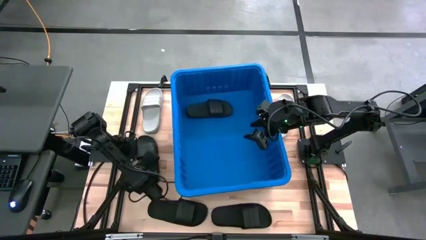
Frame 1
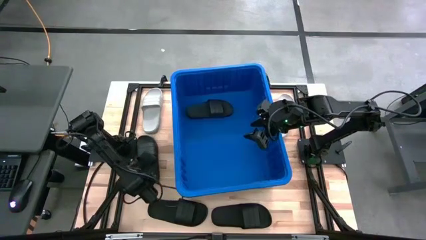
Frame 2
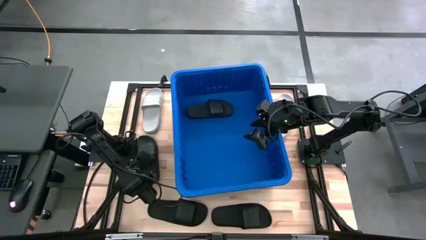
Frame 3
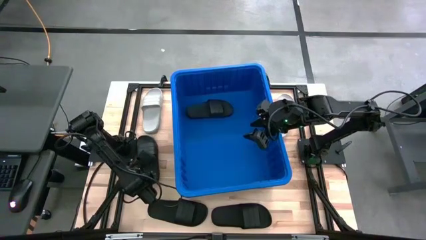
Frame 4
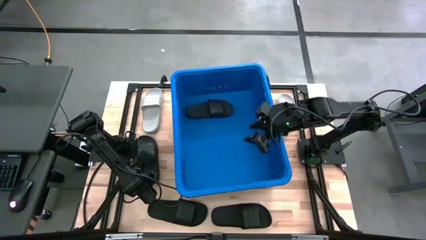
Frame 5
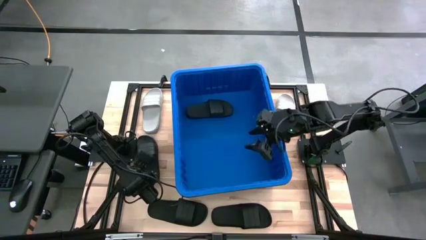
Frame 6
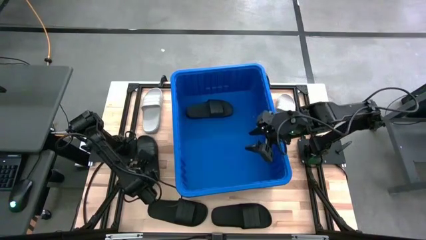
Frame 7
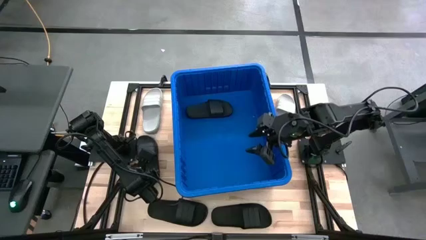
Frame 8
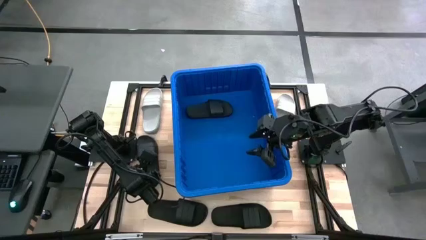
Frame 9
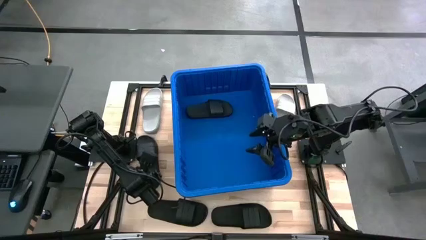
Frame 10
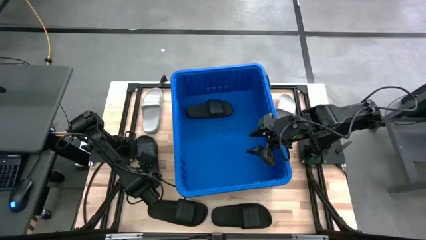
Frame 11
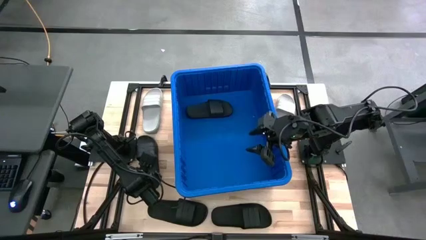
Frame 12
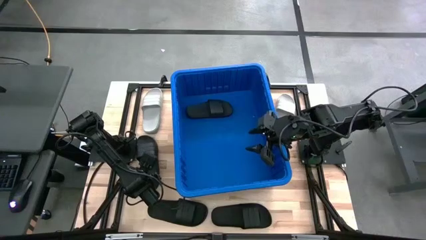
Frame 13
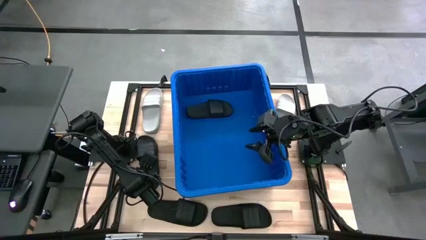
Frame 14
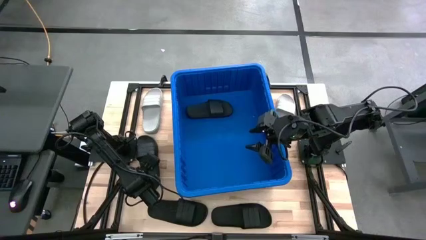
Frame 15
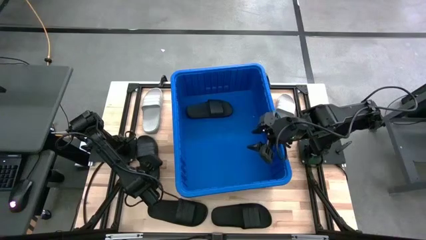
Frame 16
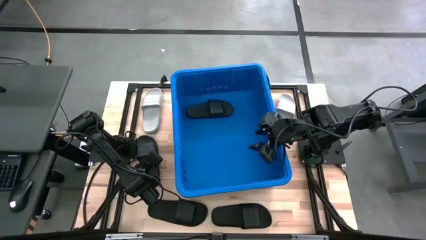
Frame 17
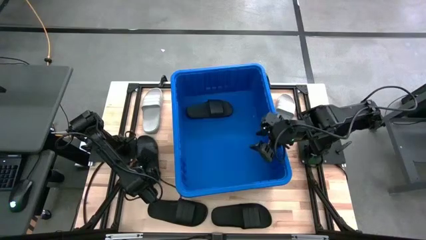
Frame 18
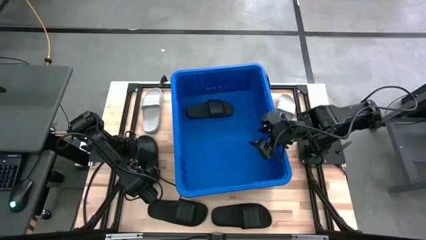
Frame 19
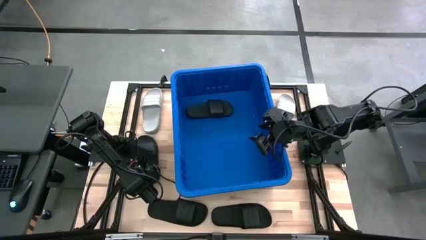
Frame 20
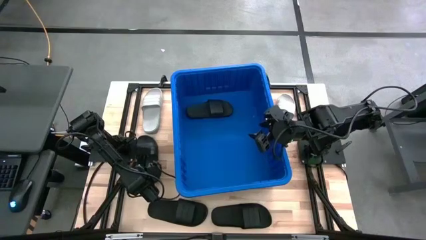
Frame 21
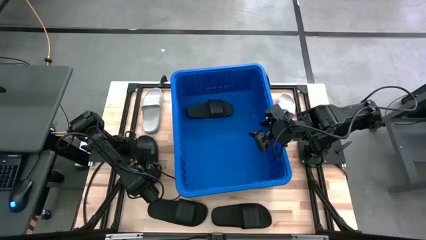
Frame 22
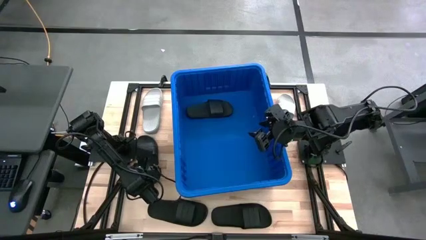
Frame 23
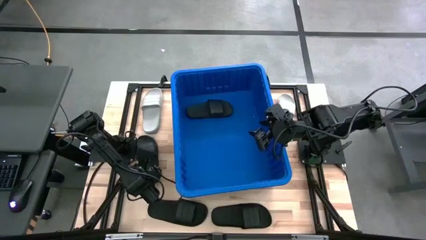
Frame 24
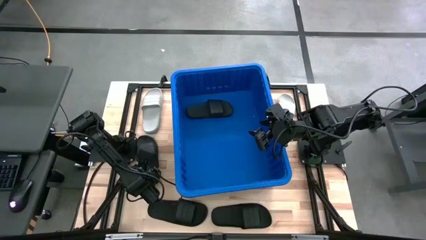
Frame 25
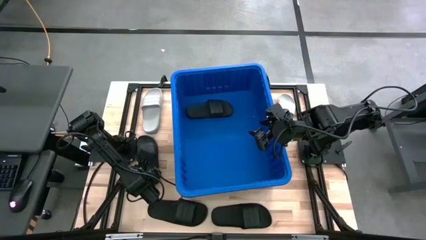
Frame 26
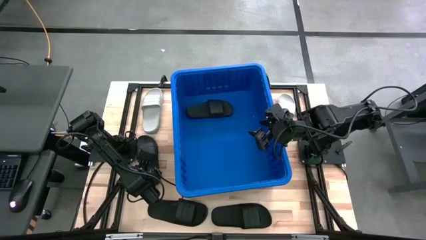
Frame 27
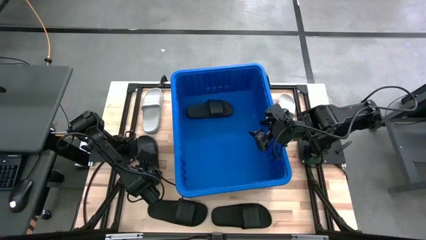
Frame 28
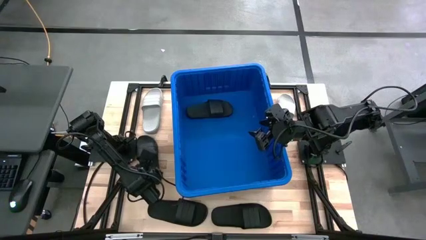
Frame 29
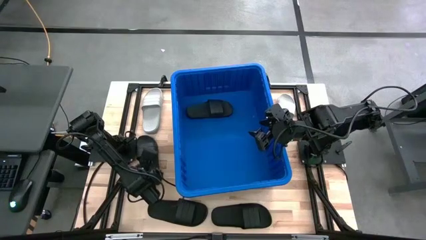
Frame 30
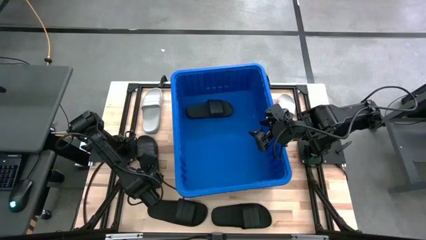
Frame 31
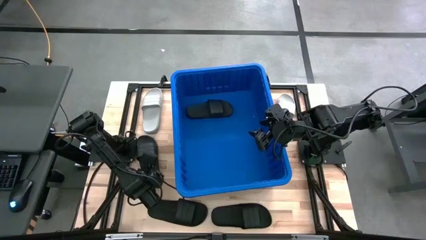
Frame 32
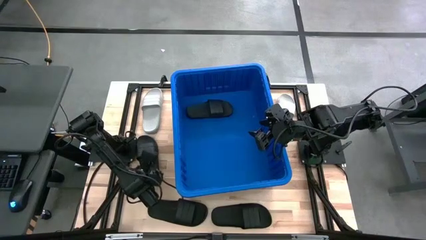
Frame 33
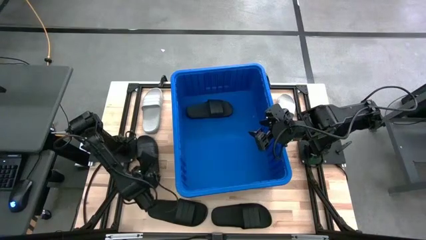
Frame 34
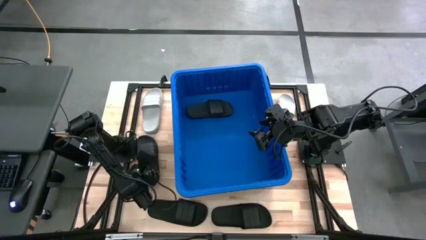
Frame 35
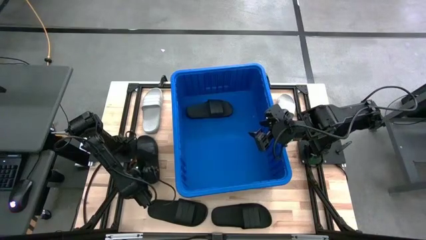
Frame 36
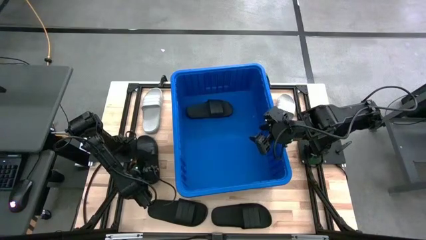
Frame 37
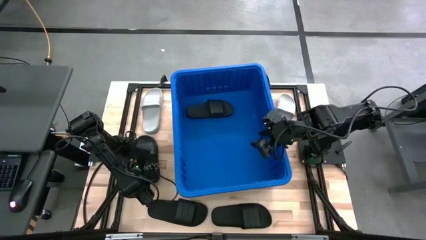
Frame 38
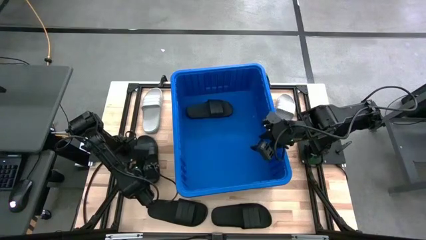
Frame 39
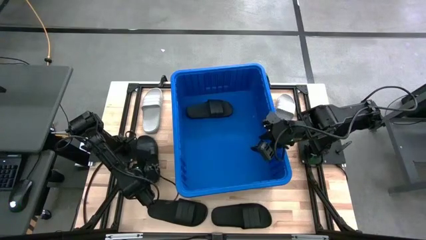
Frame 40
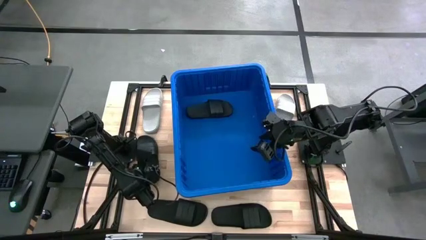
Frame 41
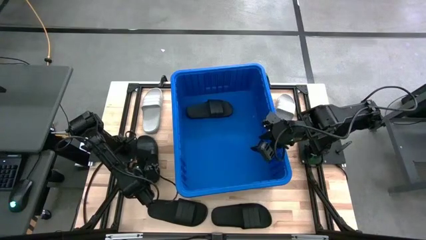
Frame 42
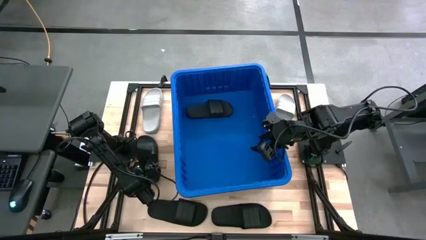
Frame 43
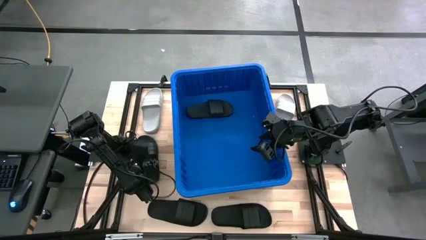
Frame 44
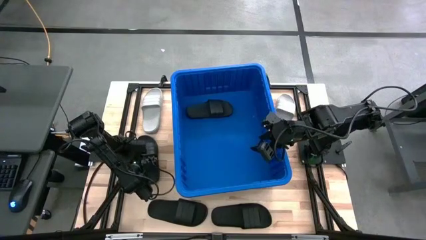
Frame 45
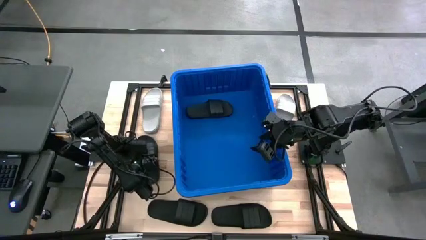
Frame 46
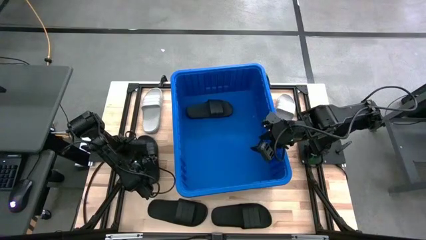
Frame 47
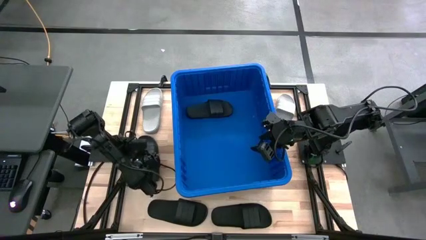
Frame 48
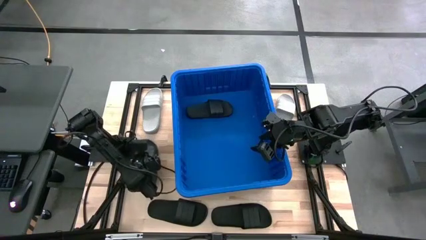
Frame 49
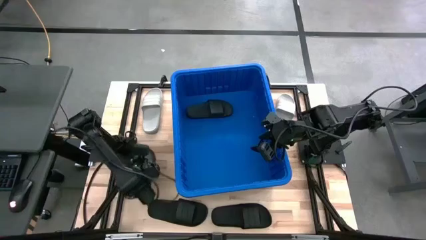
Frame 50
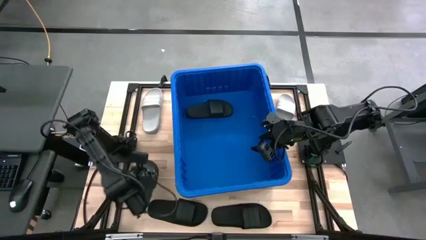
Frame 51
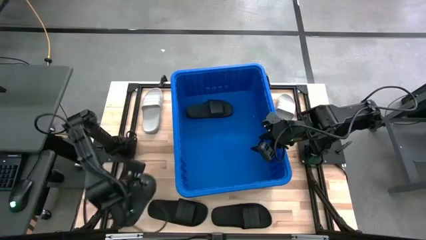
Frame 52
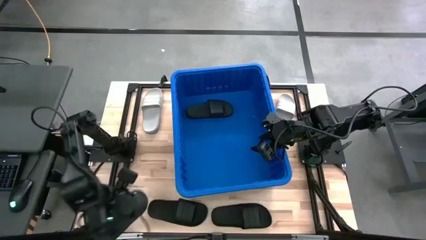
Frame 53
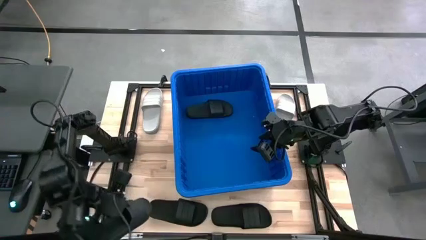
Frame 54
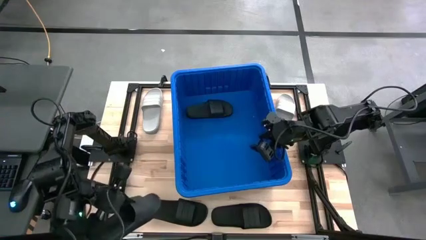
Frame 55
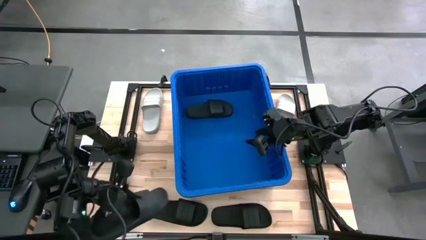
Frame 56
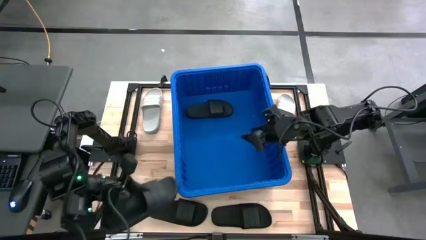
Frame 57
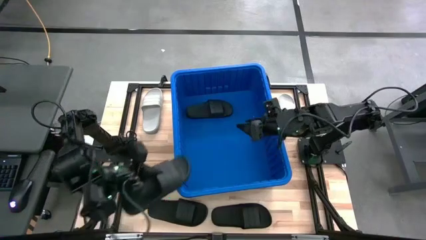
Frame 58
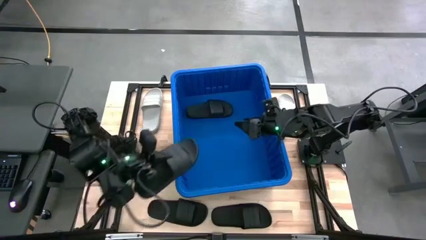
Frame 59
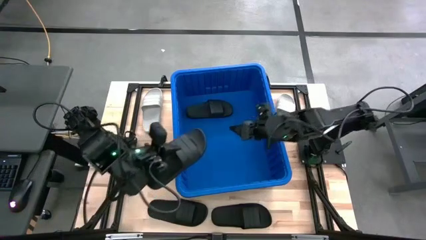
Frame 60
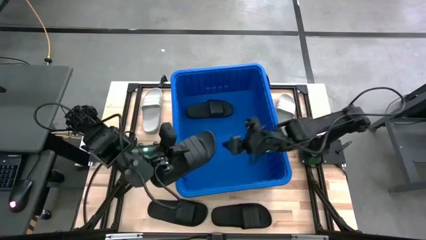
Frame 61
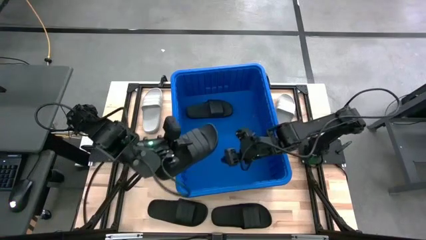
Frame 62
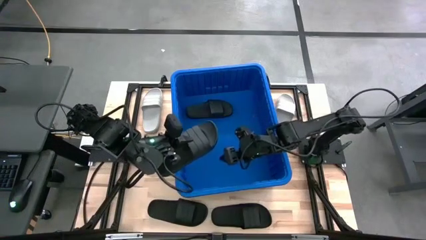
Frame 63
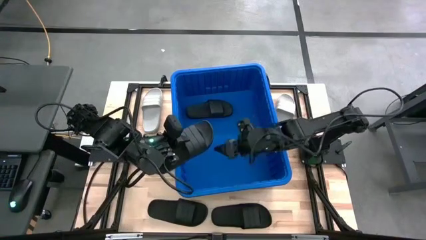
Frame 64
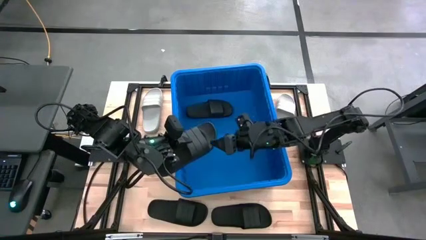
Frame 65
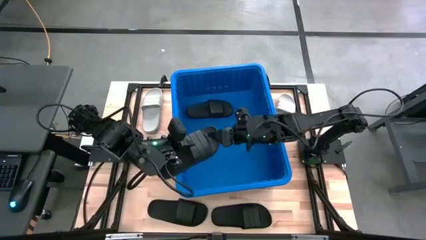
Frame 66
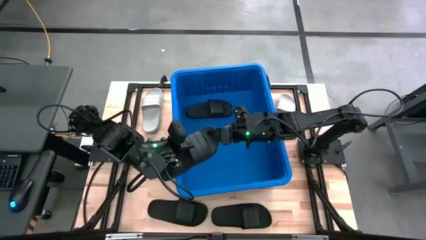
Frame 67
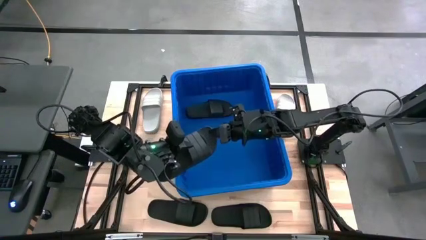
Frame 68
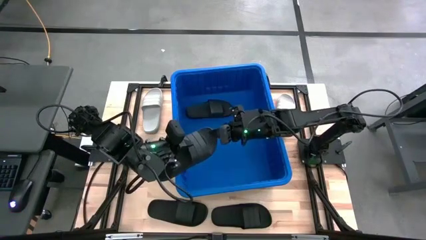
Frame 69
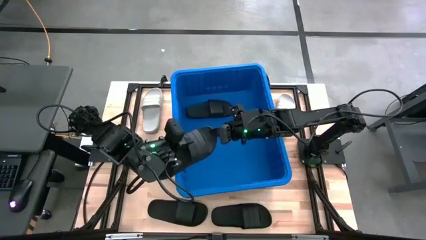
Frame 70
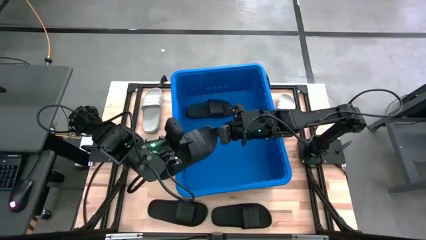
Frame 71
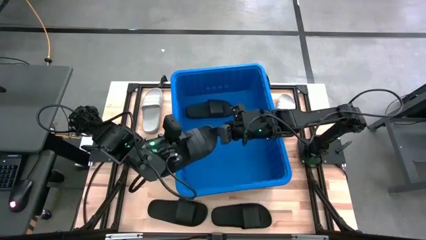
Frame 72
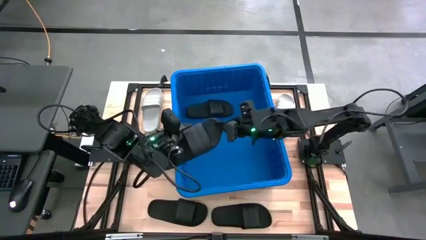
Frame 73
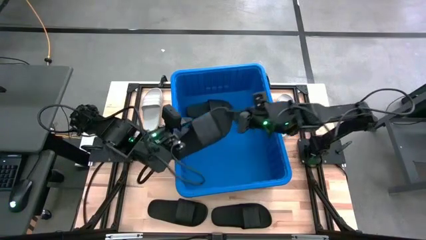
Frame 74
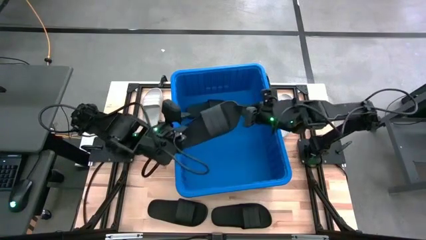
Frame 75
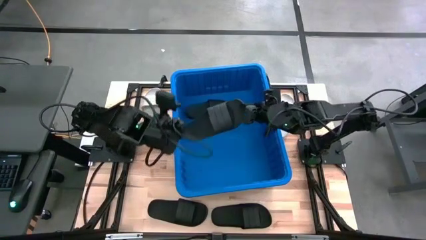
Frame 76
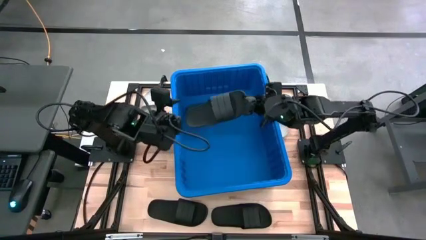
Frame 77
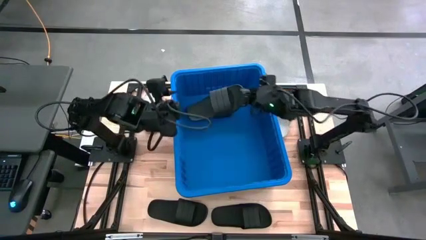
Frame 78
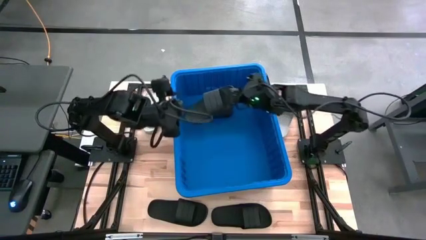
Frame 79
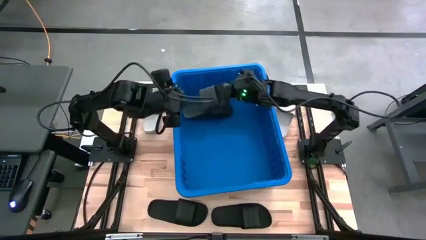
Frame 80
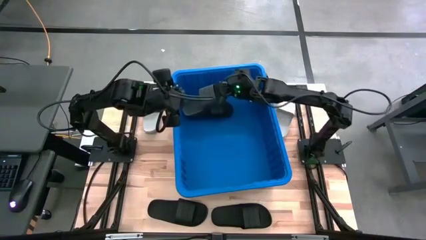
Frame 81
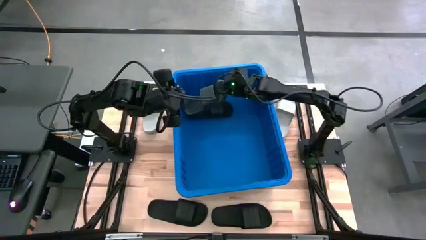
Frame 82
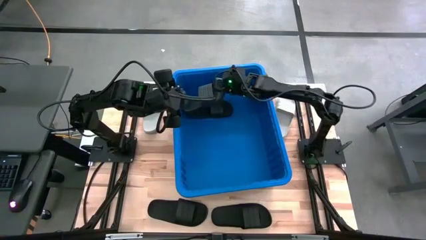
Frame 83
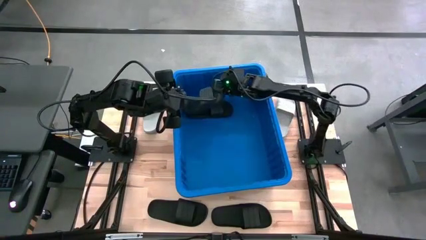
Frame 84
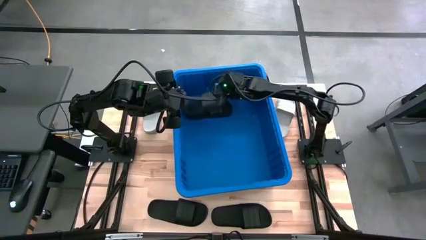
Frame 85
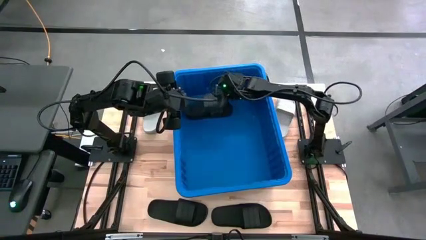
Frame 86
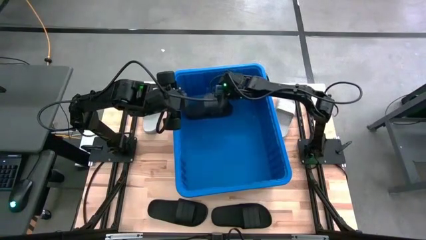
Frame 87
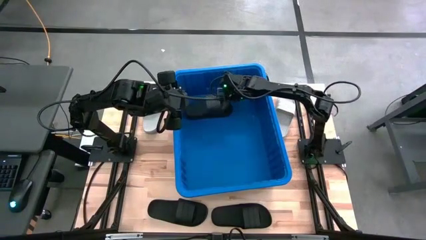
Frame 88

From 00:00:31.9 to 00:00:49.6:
Task: Pick and place slides into bin
Put the black slipper into the bin
